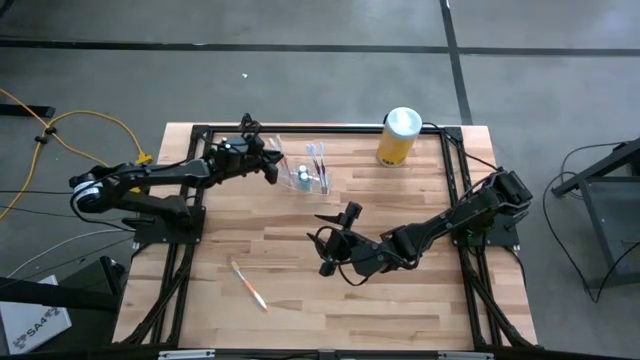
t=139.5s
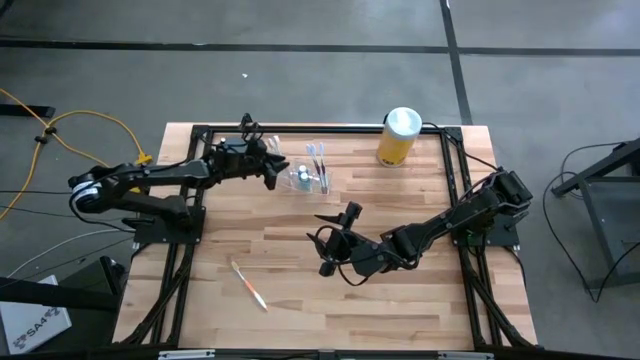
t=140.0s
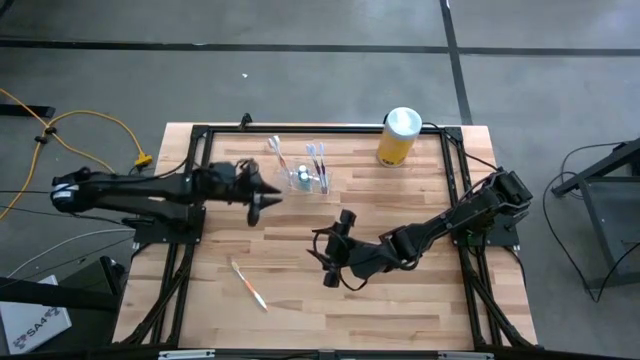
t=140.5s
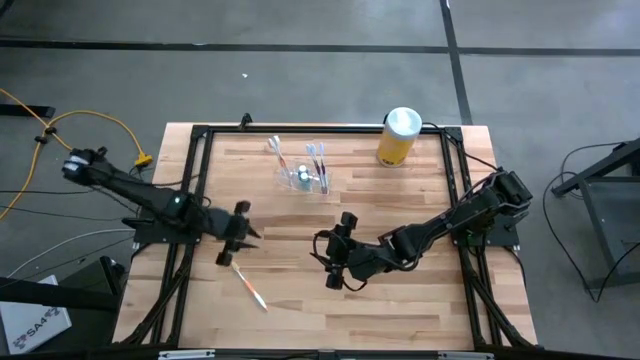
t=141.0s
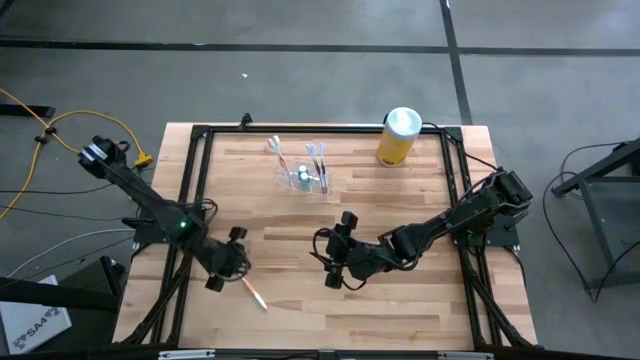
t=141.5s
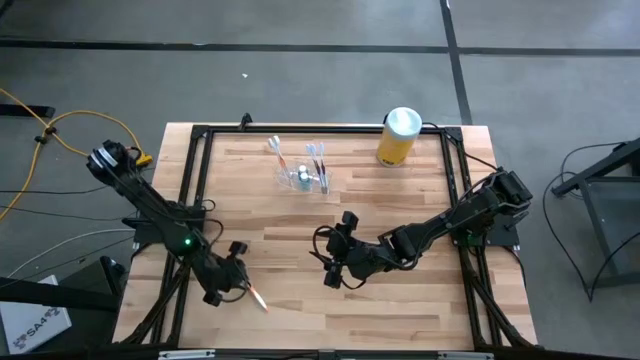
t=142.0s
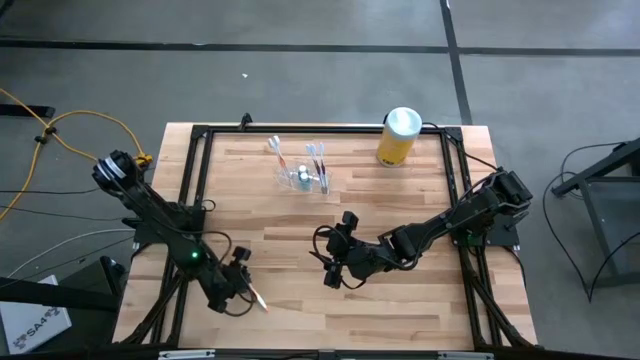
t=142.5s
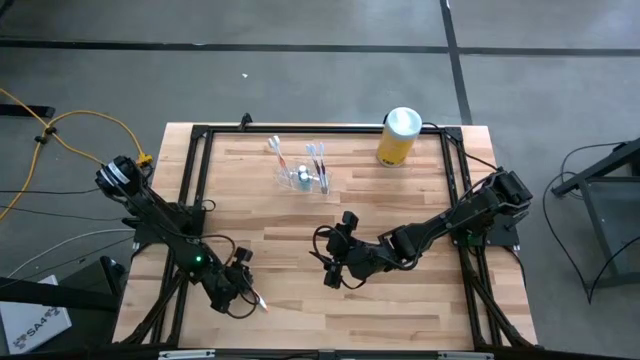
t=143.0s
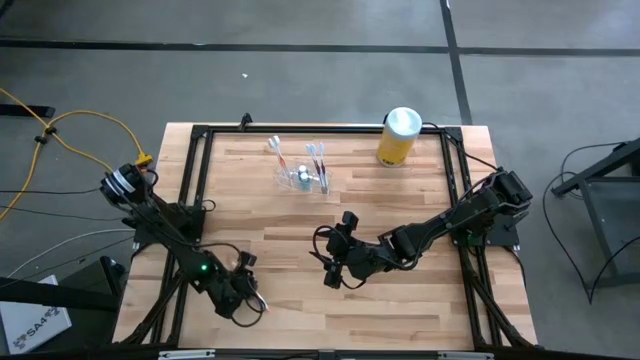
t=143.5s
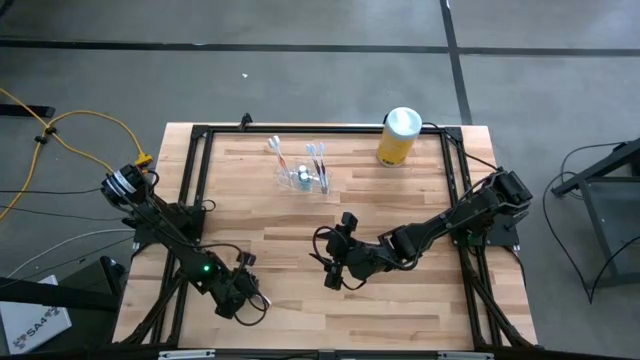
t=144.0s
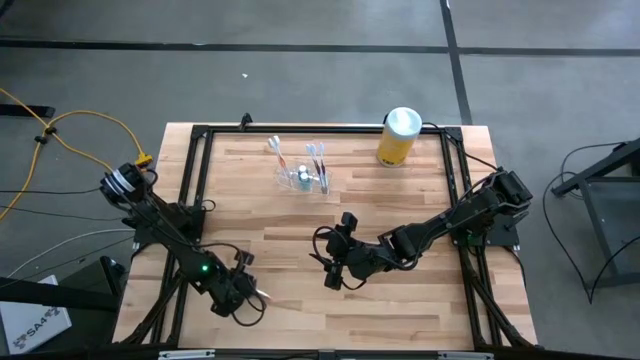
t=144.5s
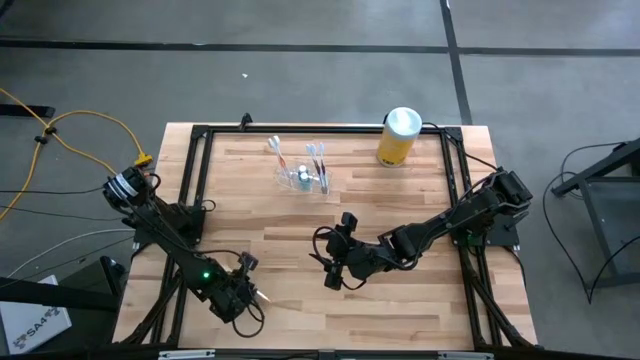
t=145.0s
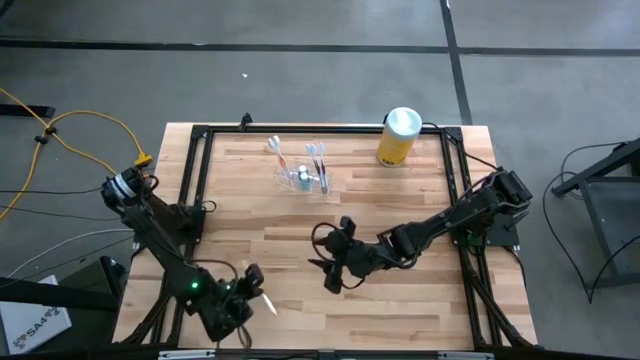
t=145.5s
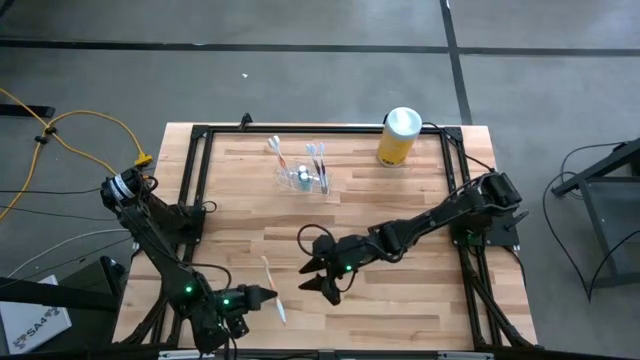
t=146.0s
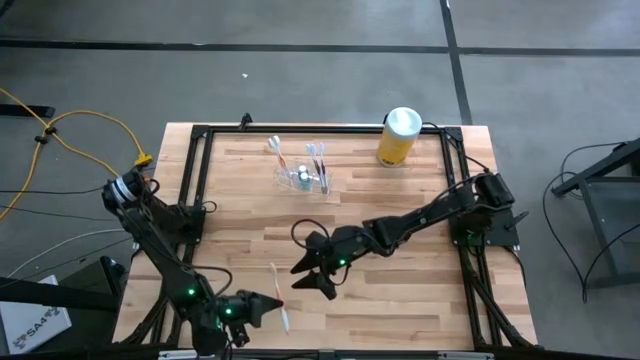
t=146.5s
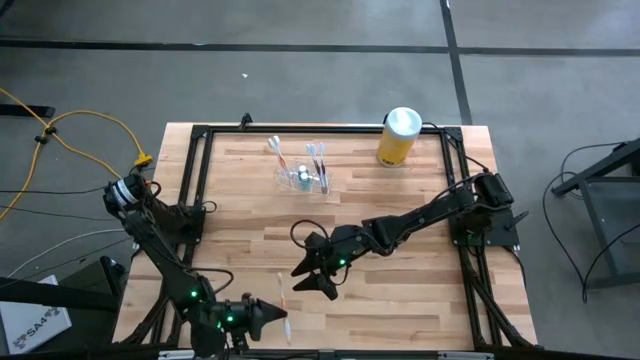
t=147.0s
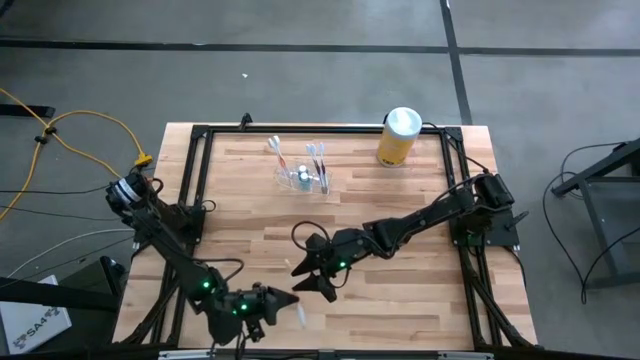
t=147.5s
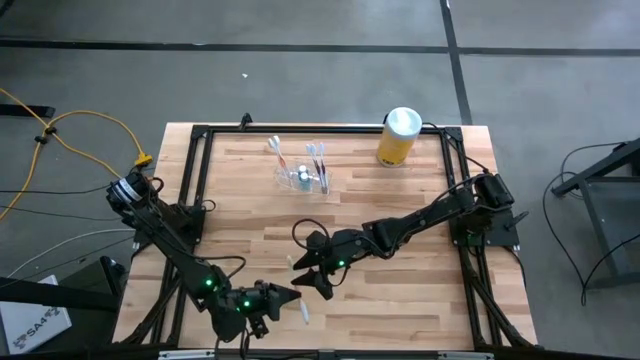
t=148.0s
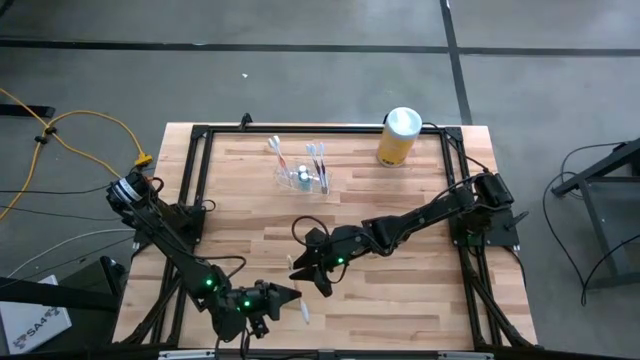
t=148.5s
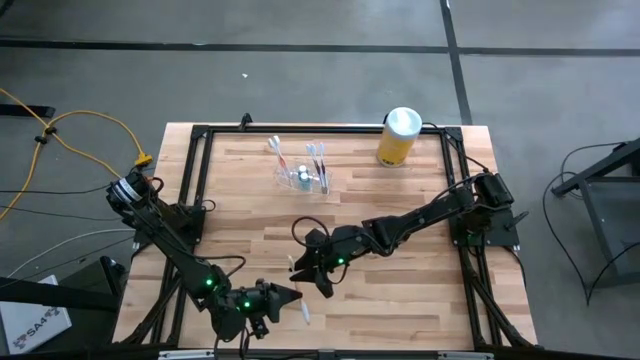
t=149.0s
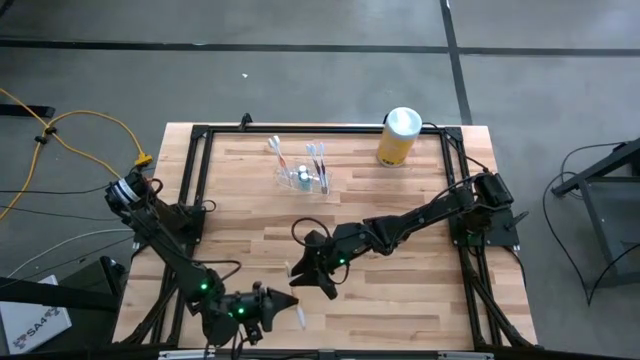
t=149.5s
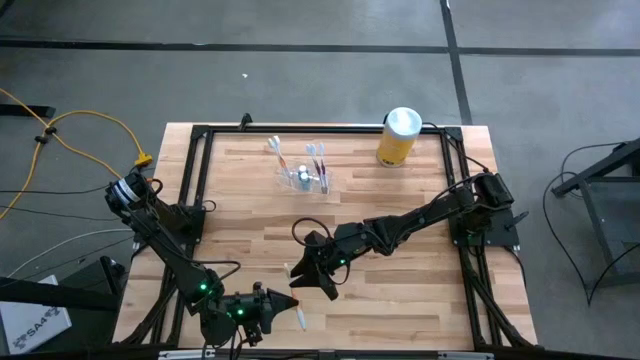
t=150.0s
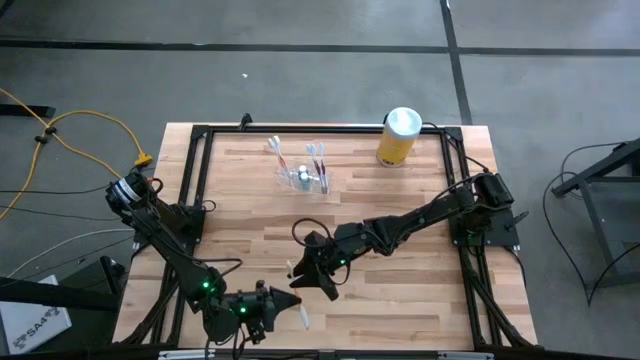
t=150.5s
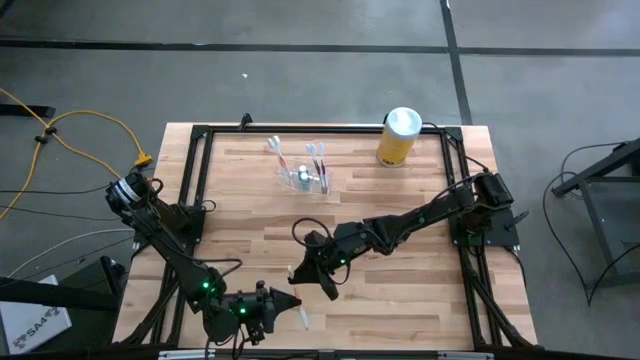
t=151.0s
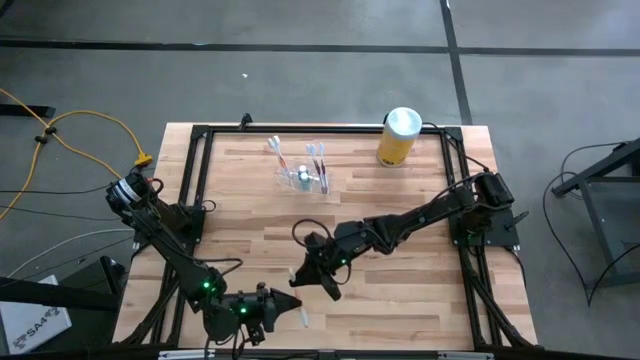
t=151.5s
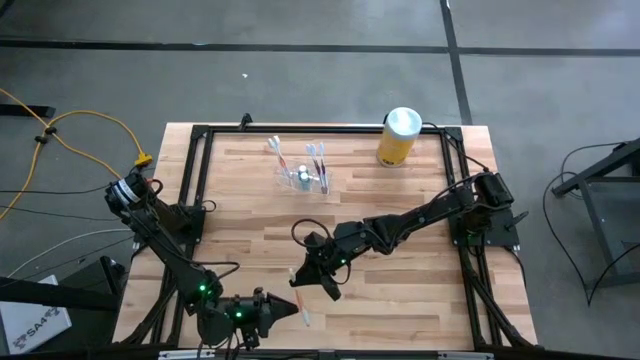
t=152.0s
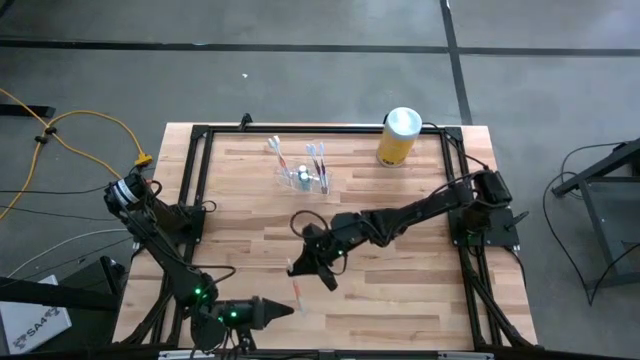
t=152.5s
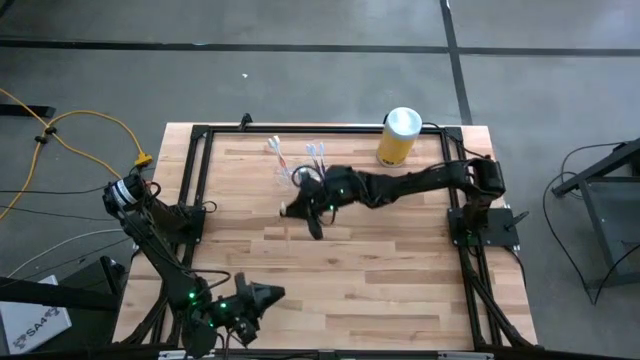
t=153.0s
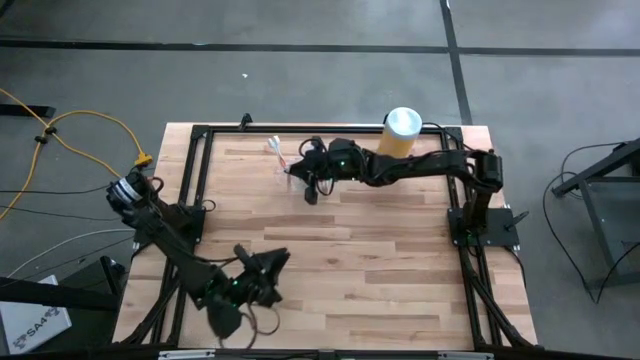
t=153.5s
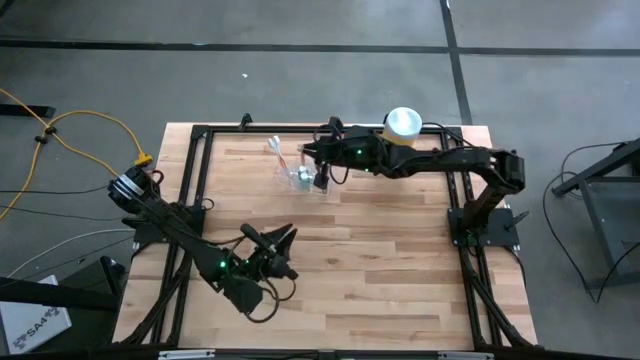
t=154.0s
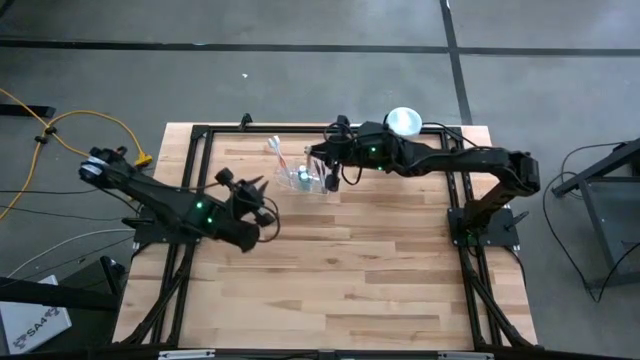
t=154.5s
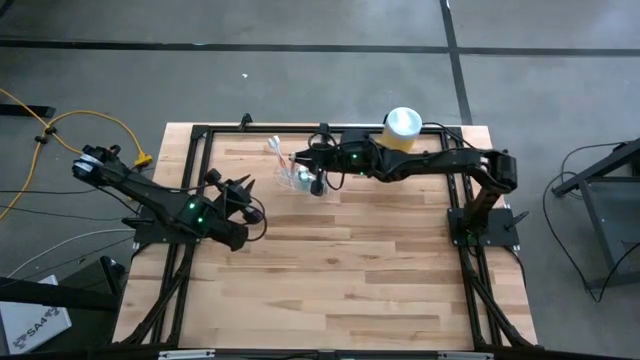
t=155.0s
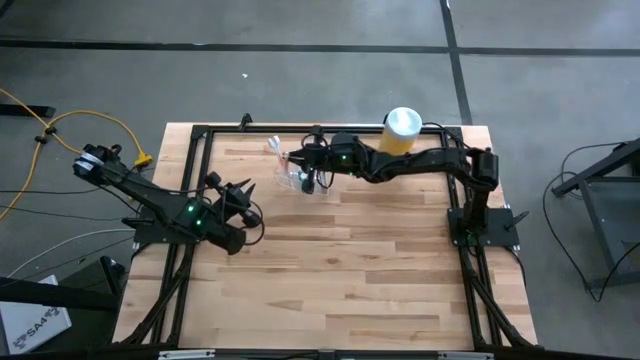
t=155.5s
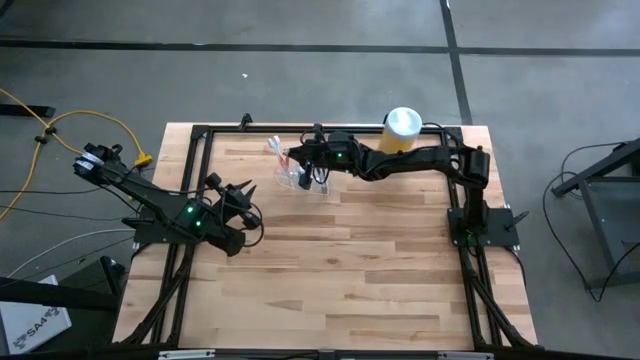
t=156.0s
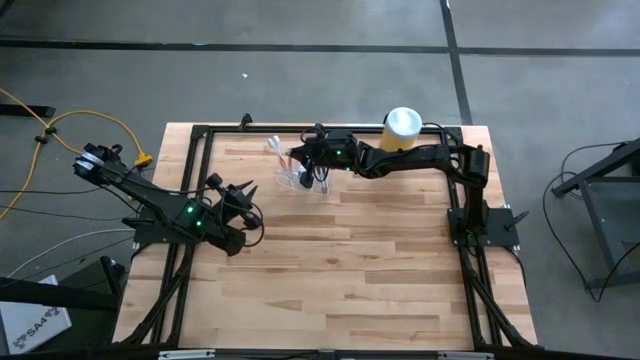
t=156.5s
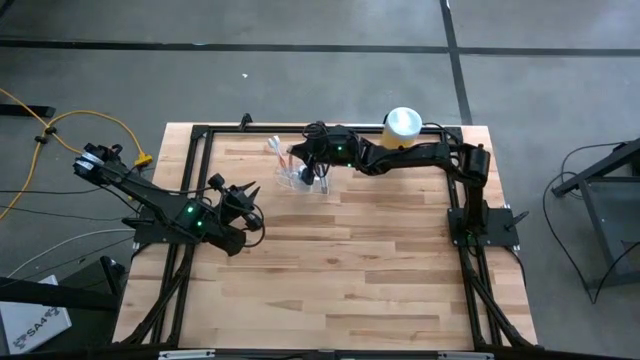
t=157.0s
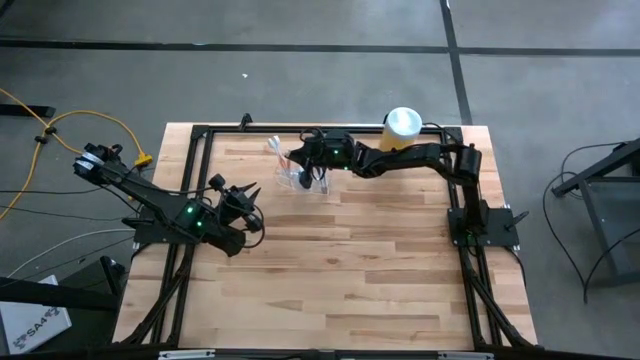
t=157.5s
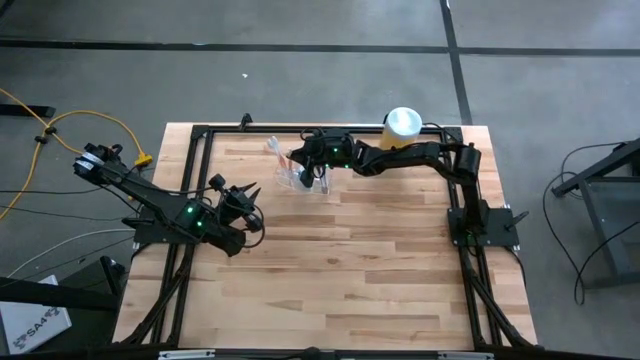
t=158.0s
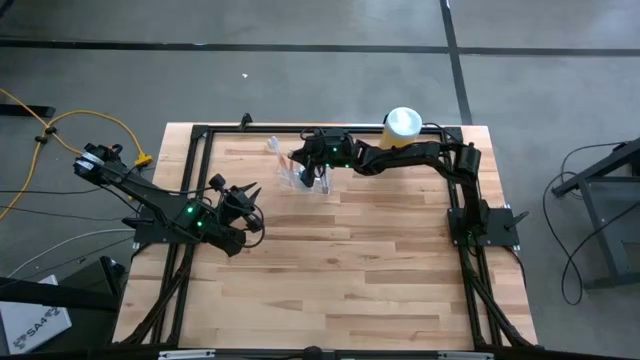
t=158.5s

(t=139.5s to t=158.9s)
Task: Pick & Place toothbrushing station
Put the orange toothbrush into the transparent organizer

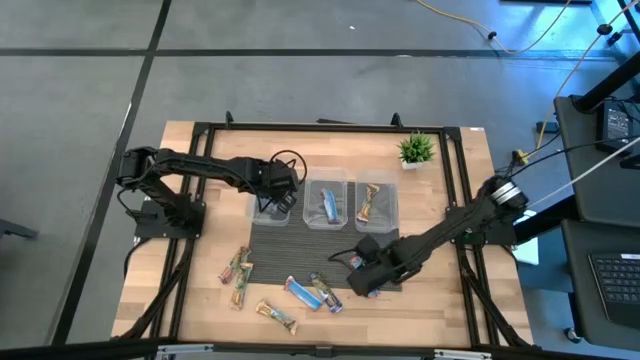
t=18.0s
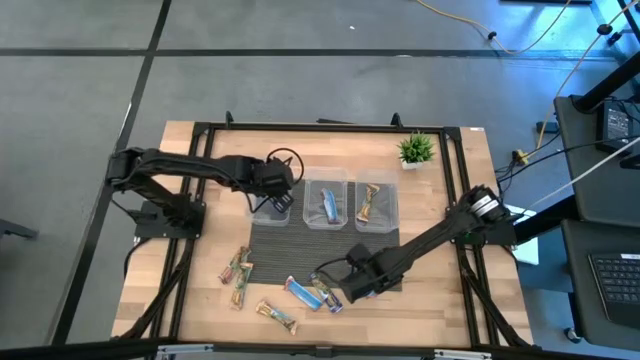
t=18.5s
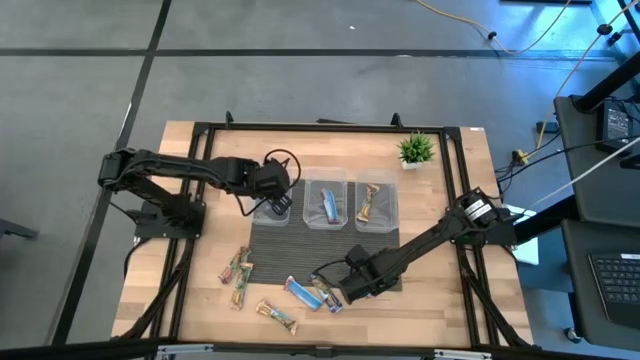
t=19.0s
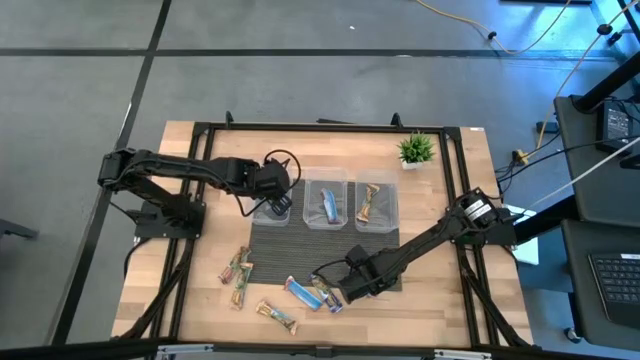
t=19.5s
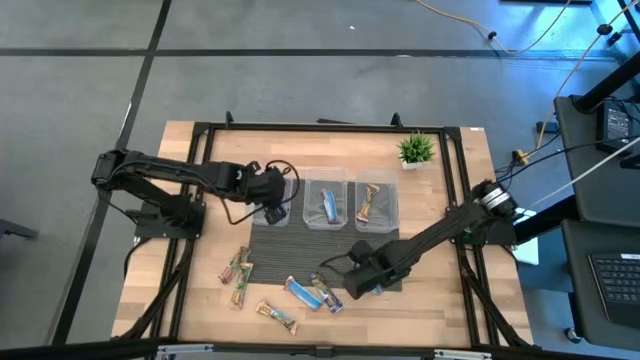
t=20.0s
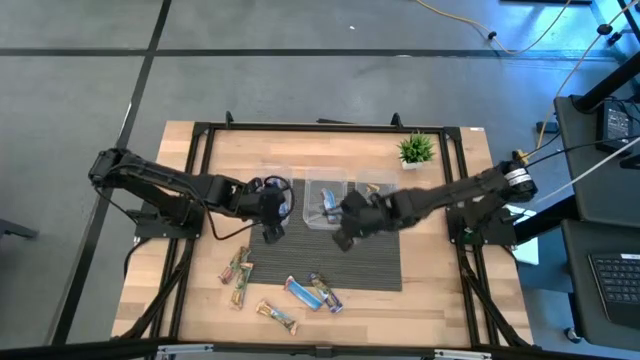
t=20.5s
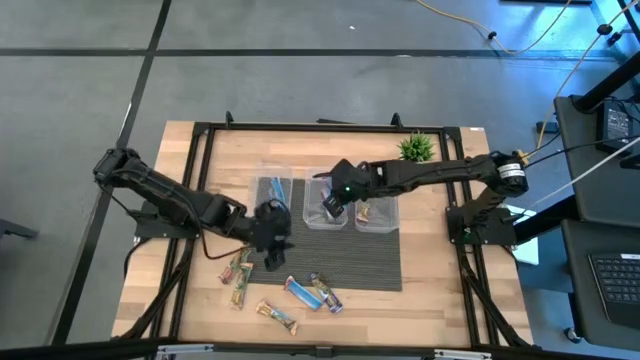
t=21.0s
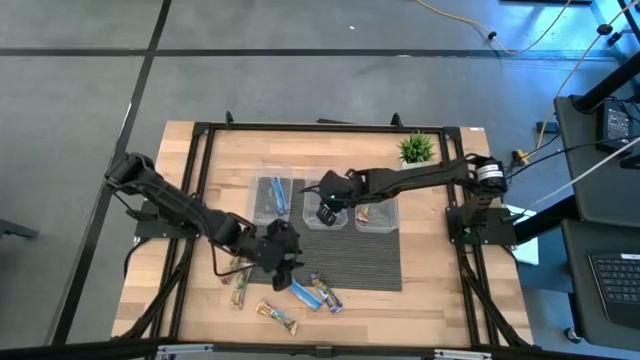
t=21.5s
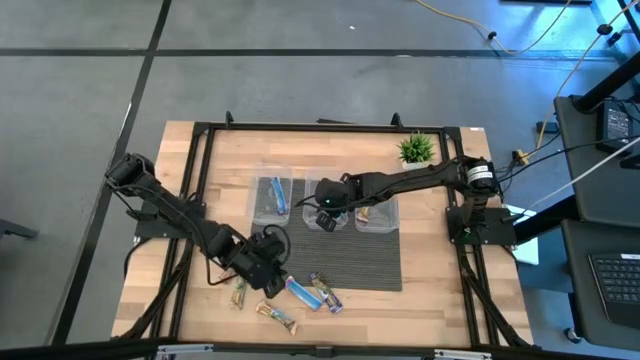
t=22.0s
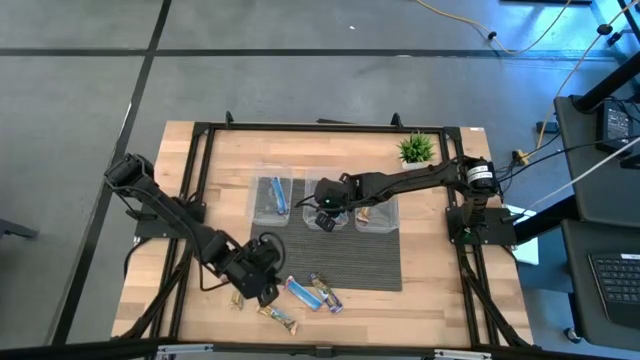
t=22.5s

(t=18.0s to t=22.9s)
Task: Pick and place Granola Bars by type
Put the red granola bar into the middle transparent bin
